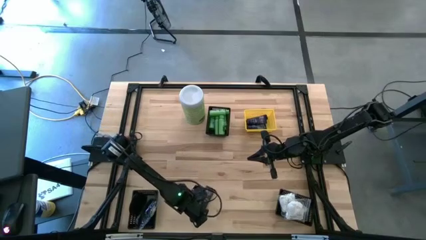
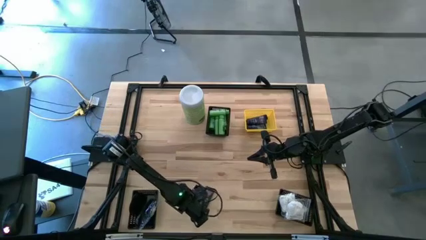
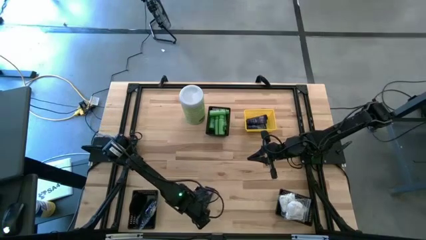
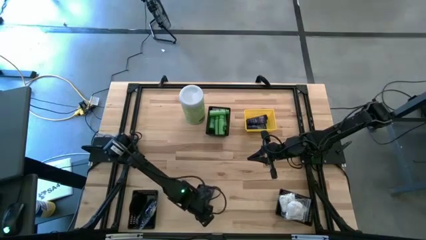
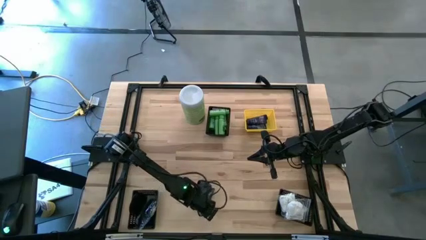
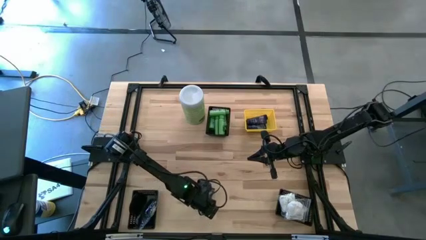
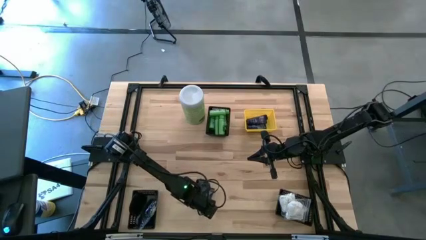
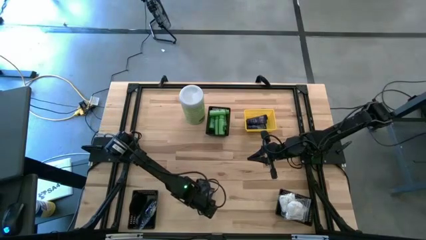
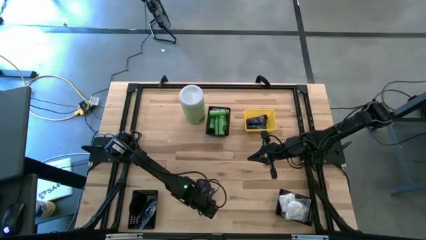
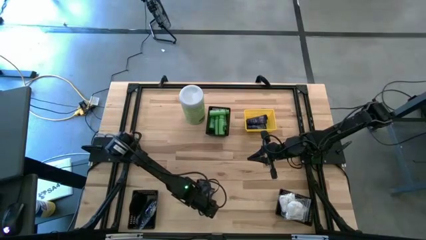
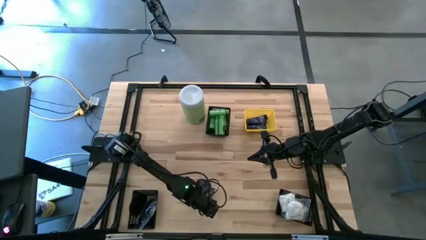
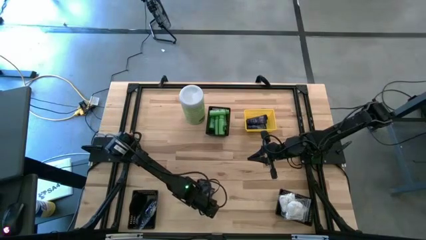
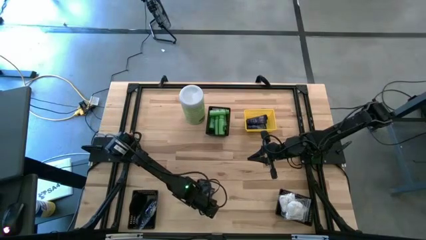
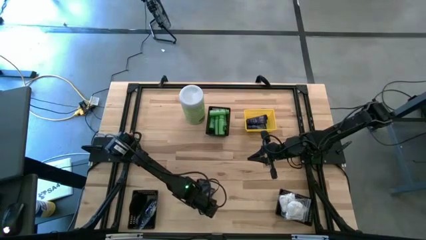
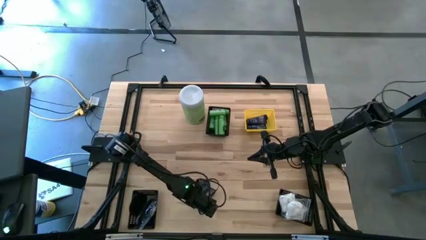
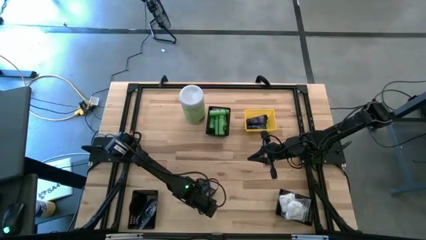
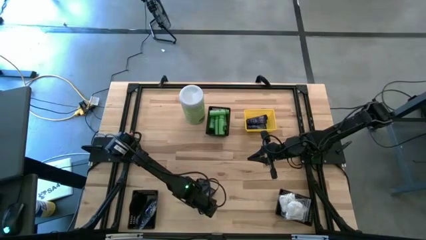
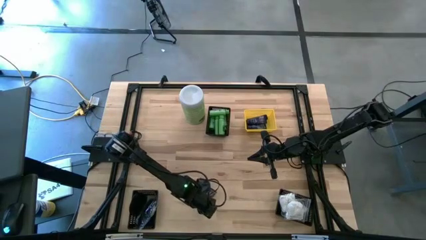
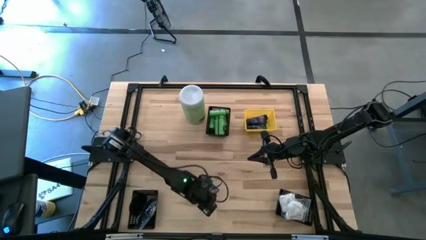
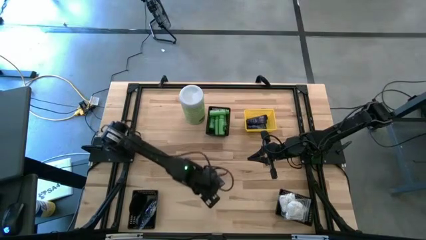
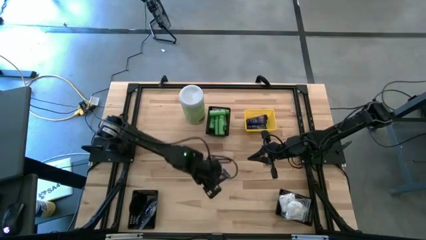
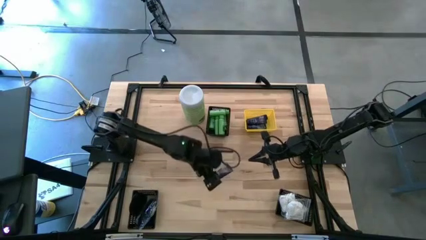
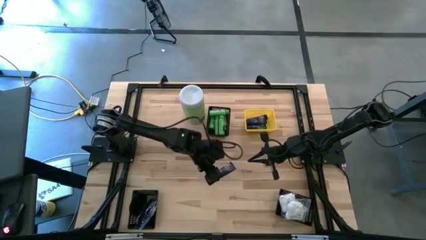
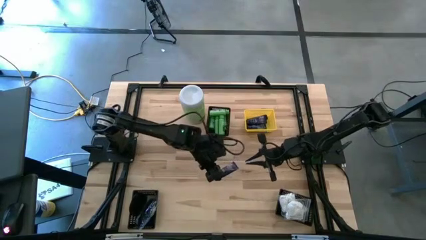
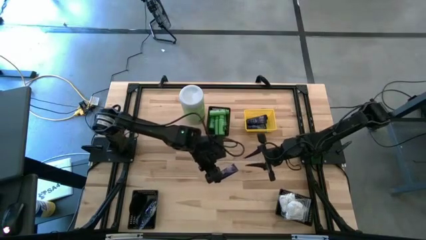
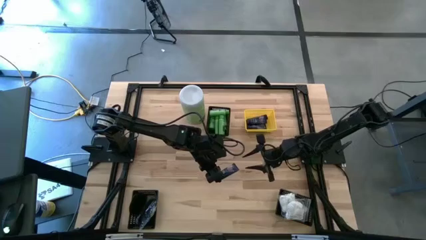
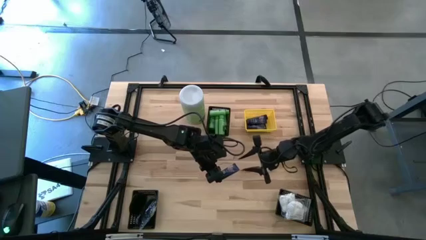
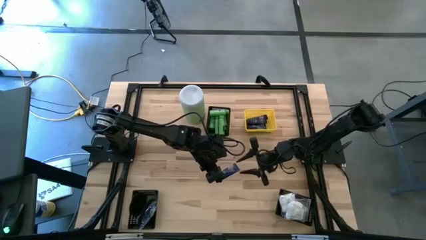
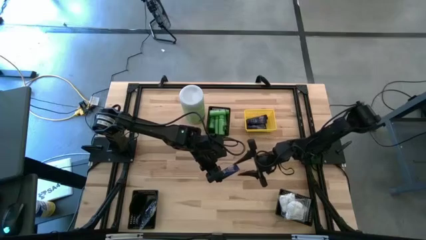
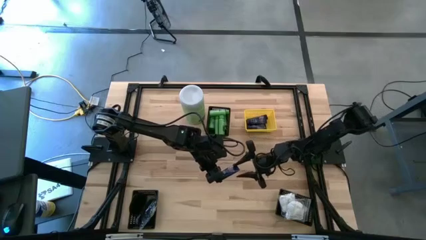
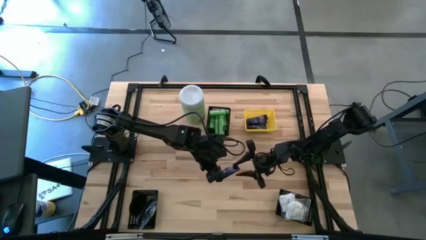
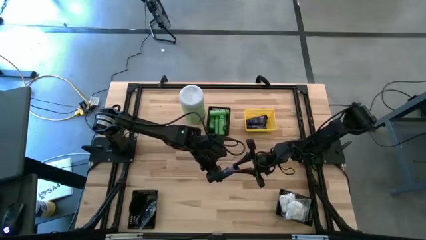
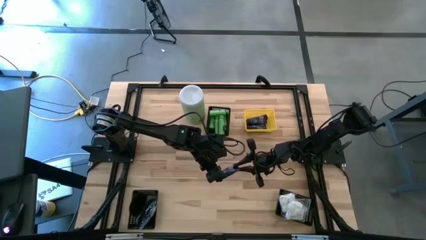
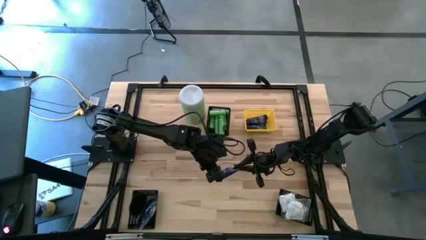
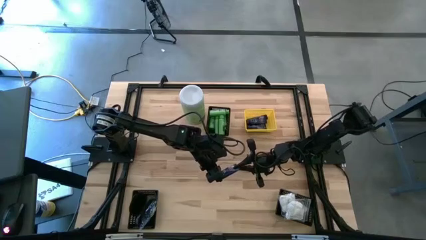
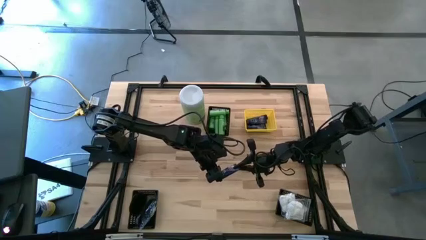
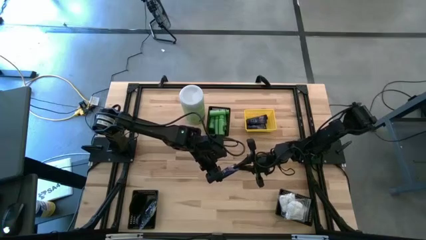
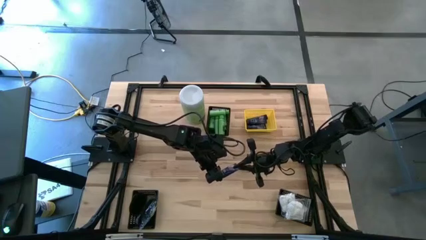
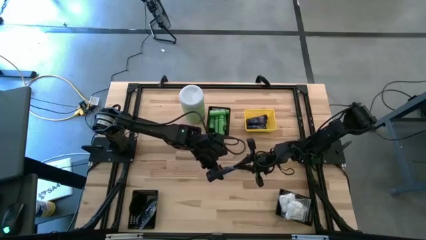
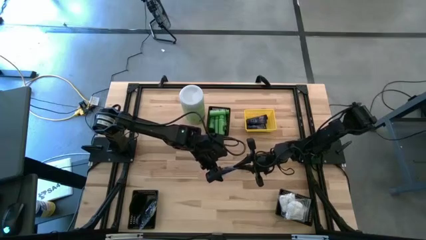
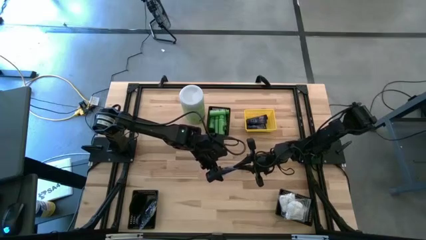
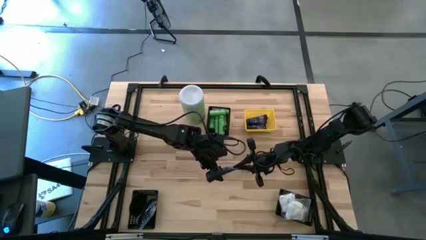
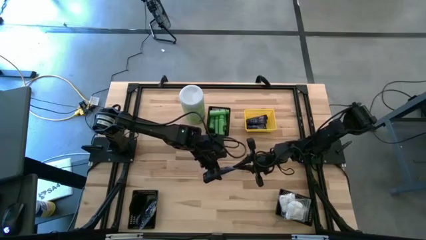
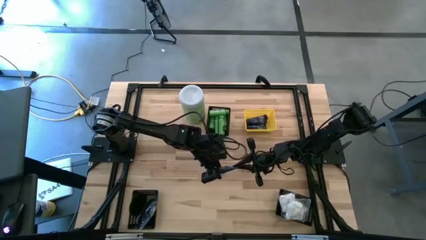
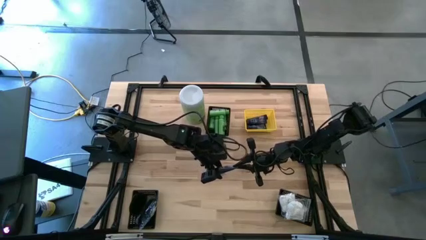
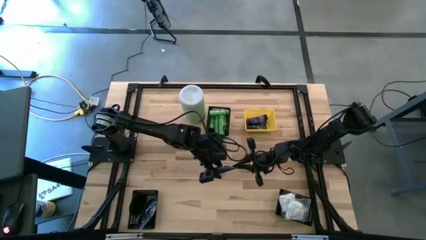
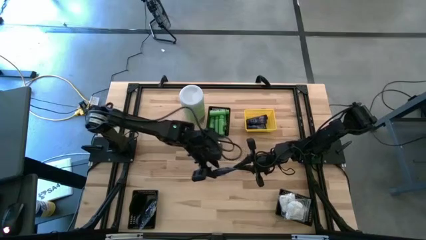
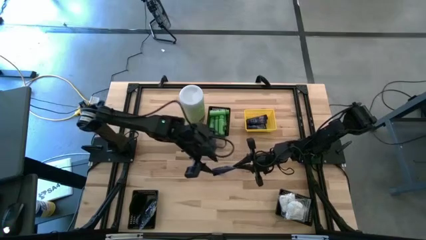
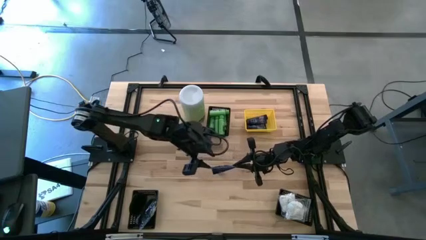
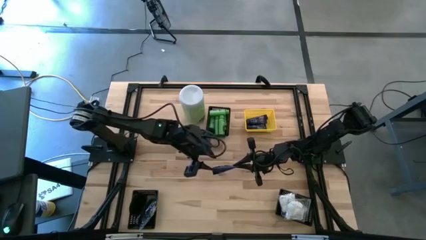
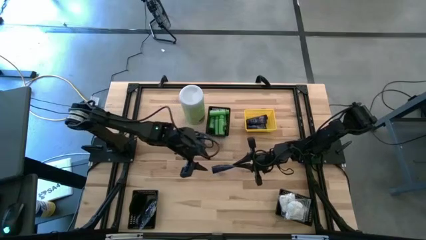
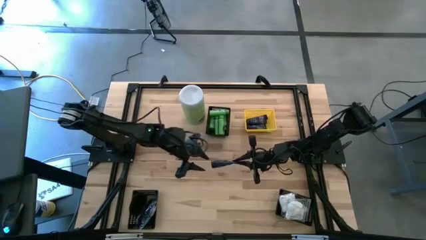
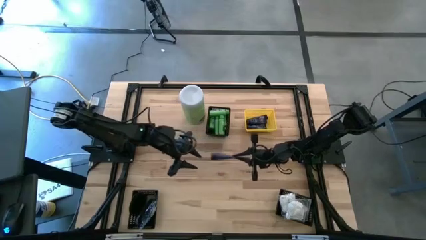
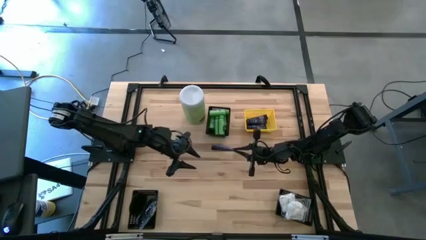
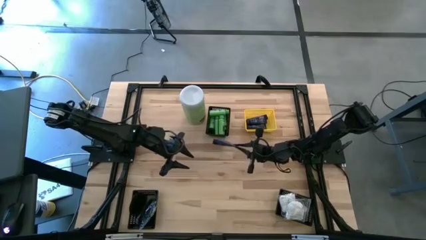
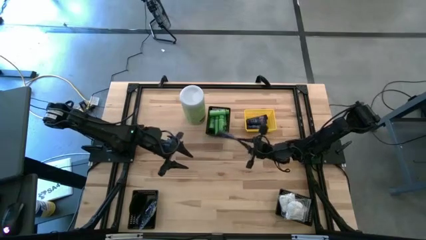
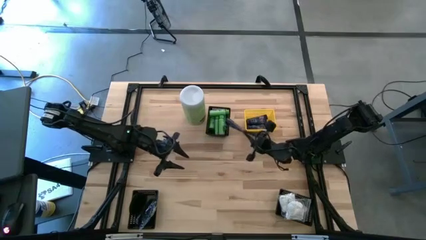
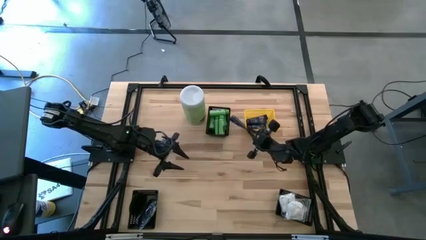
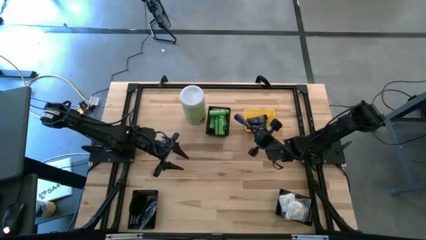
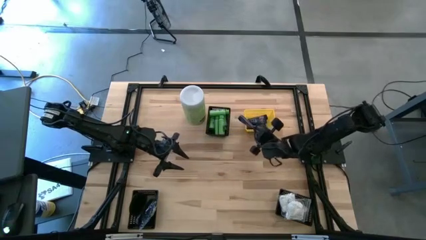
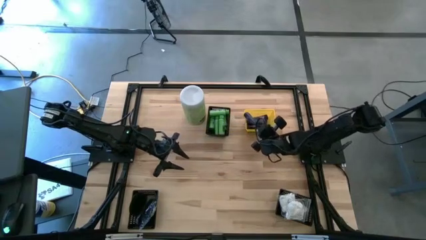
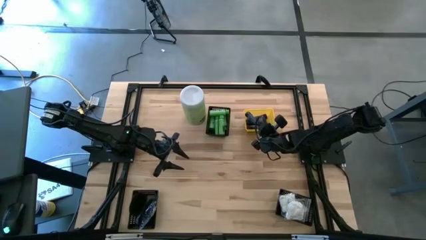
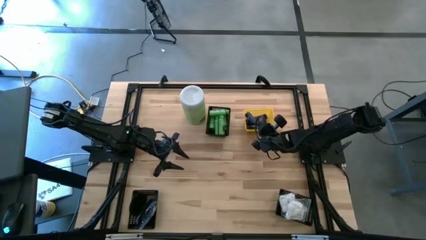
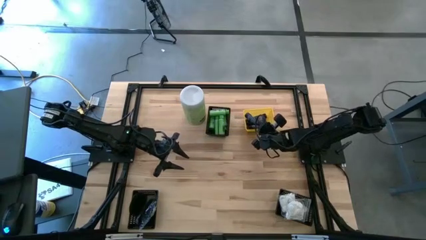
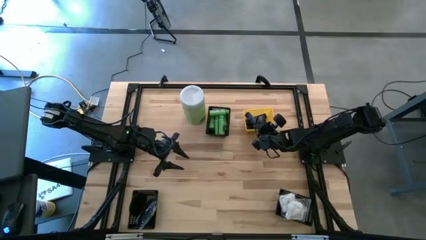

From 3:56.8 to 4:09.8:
Task: Pick & Place Travel size toiletries
Put the blue shave butter into the yellow bin
